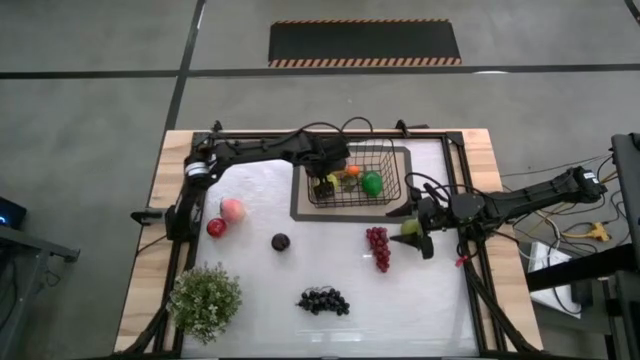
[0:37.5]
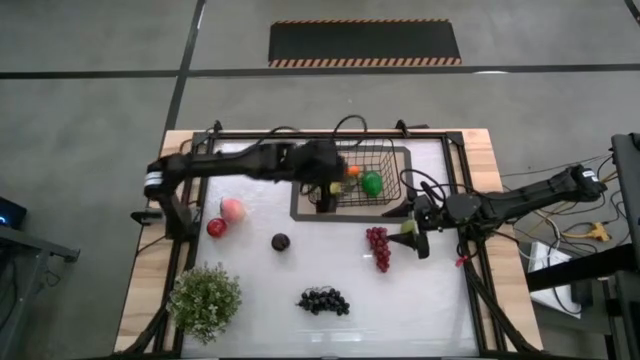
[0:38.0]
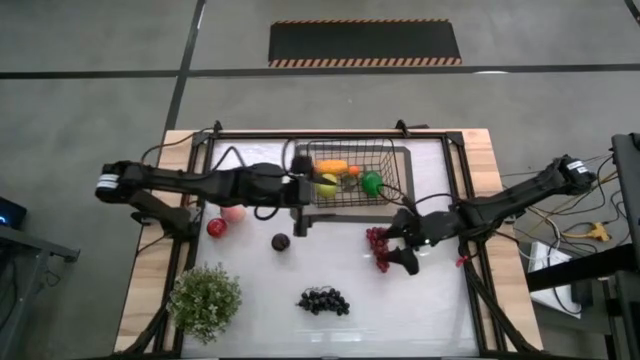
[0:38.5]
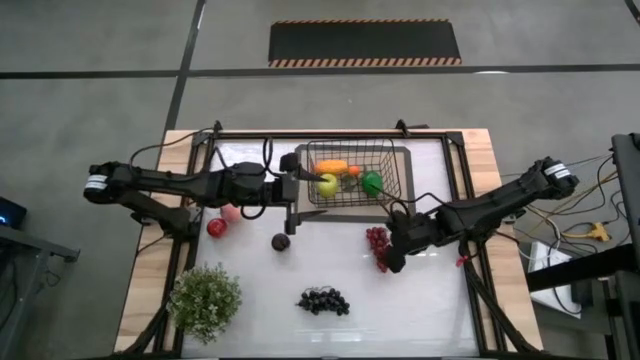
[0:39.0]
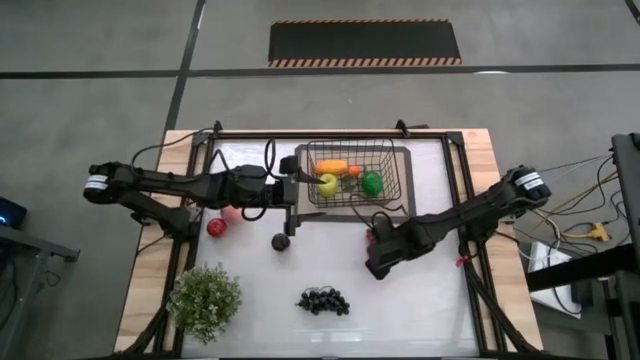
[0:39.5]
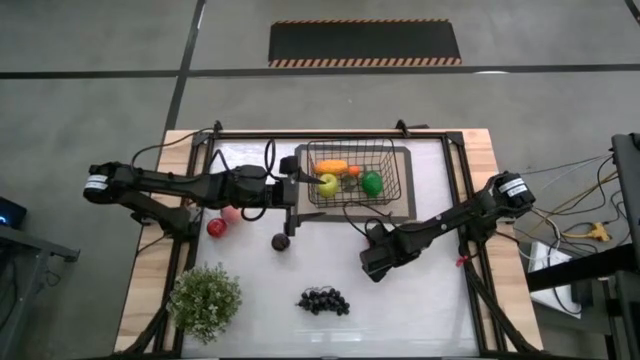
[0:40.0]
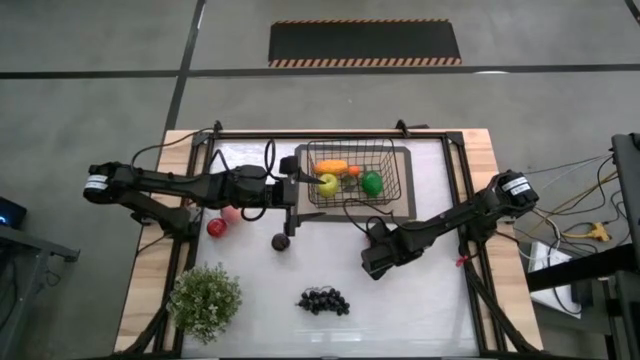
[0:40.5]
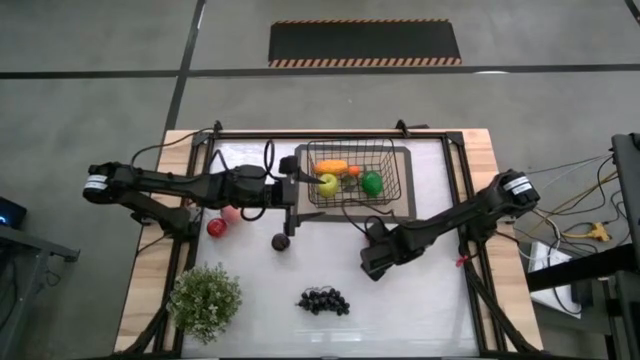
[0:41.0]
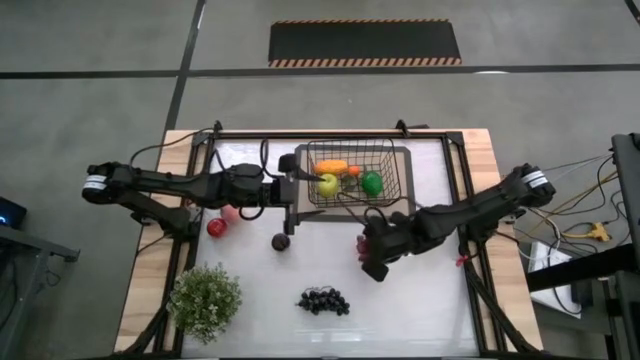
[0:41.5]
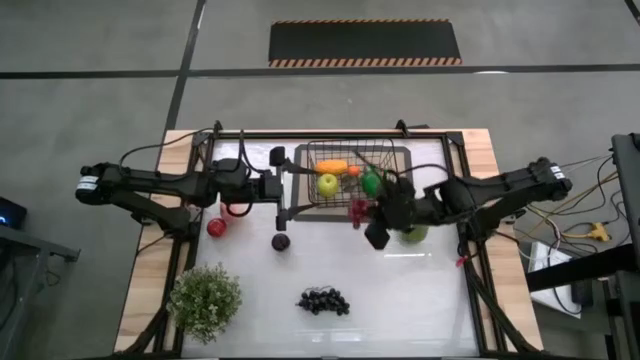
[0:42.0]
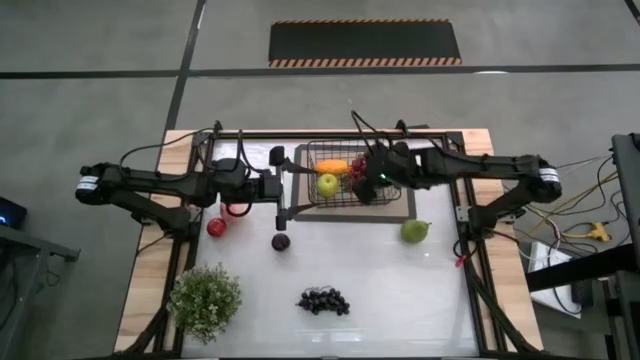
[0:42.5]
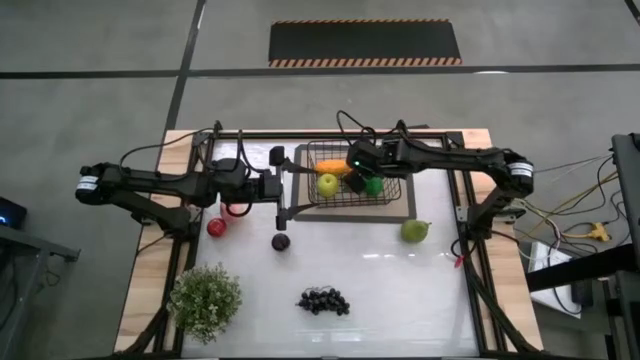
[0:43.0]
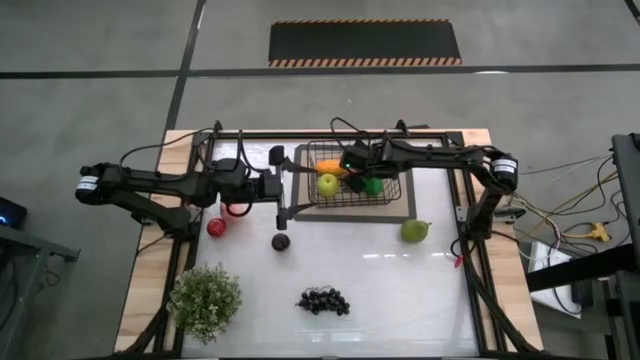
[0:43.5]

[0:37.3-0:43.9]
Task: Build produce basket
Put the red grapes into the black wire basket

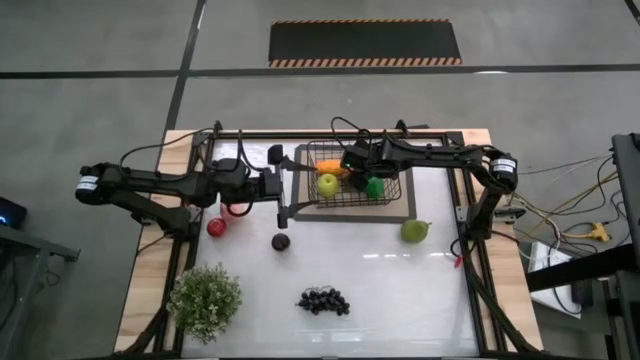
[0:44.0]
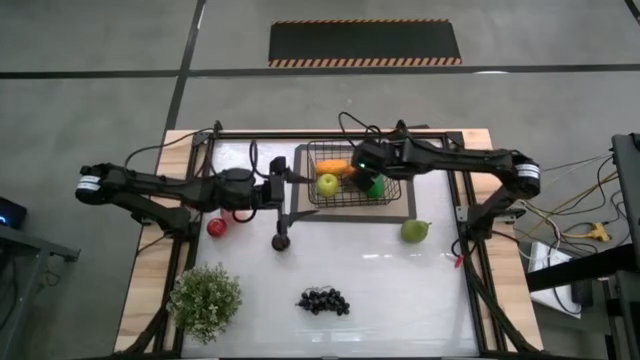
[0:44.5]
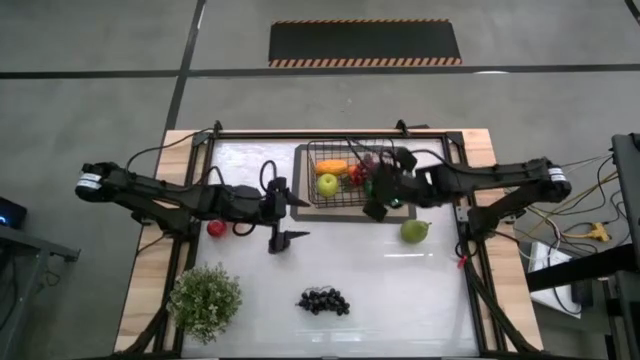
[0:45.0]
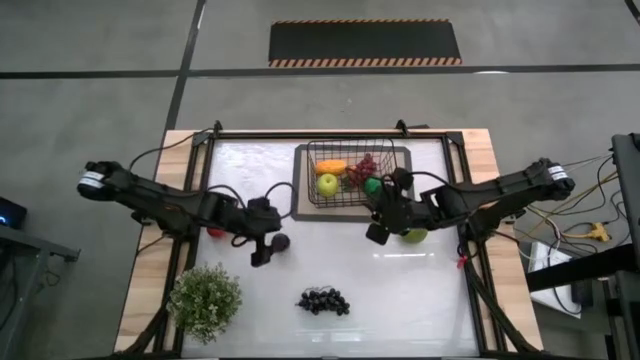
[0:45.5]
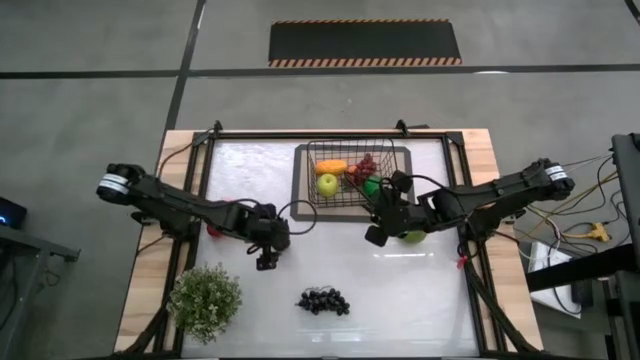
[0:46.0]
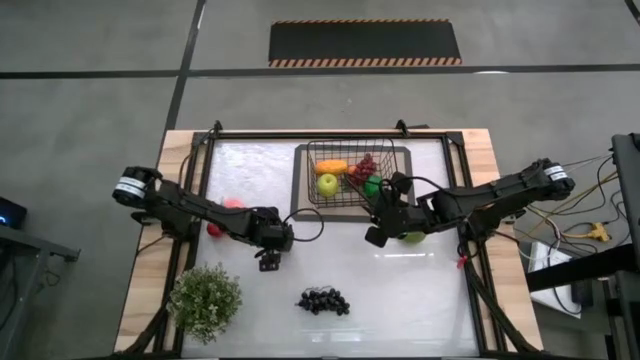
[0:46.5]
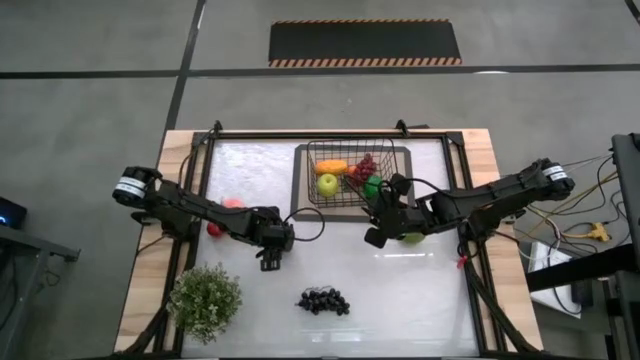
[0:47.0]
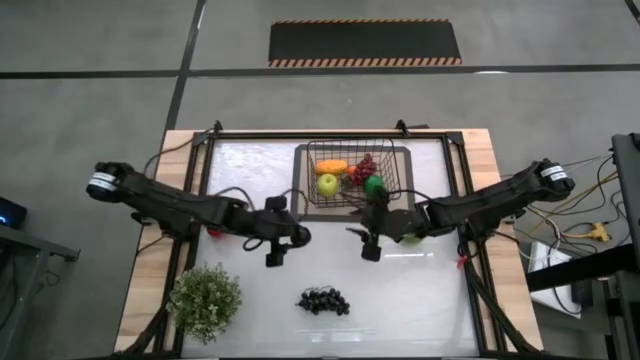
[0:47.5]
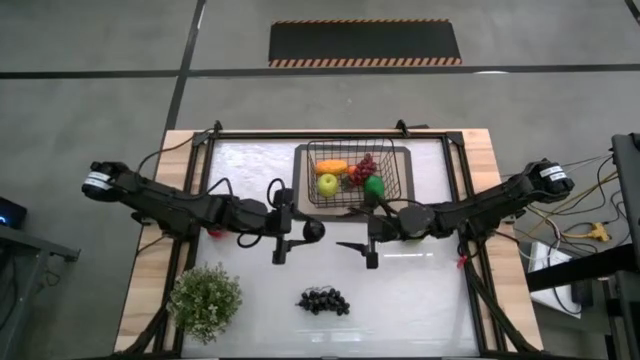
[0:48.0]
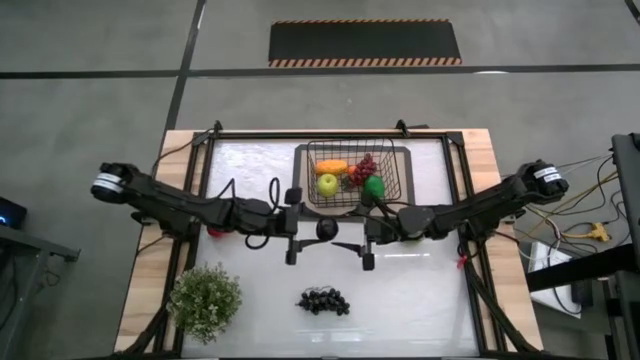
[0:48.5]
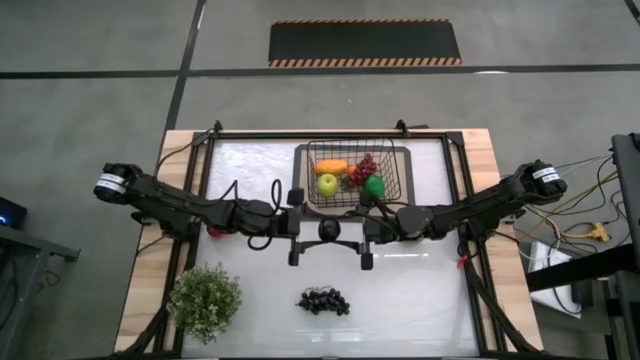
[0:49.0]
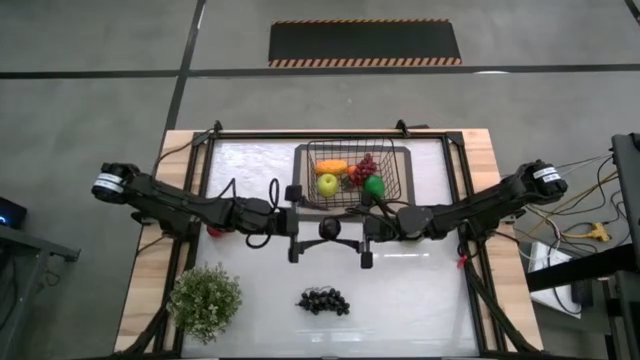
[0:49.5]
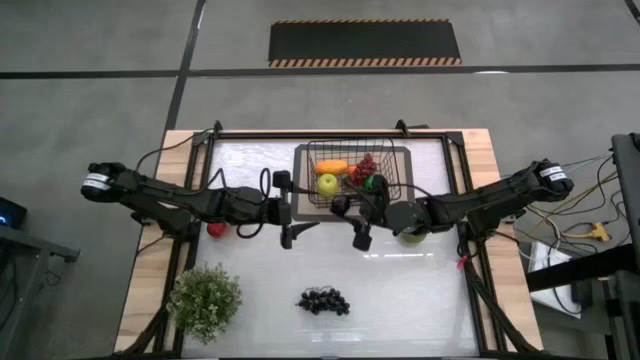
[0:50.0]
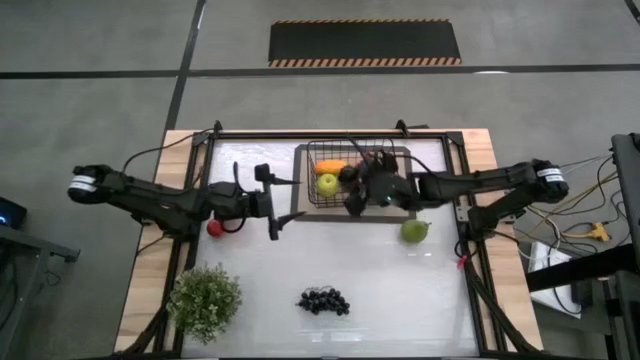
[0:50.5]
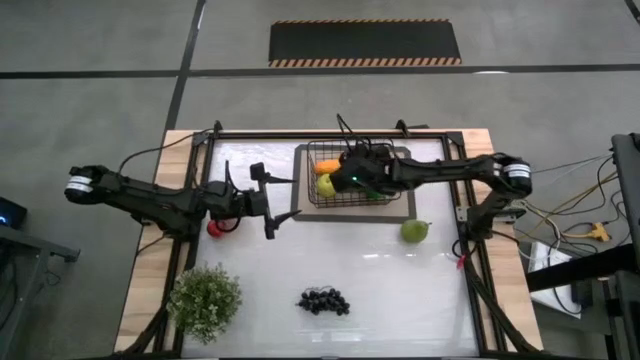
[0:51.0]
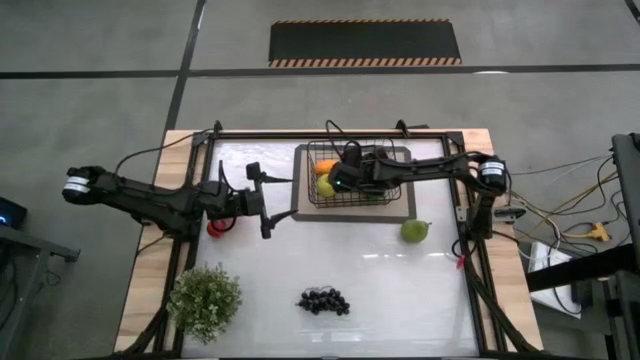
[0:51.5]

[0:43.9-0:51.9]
Put the black plum into the black wire basket

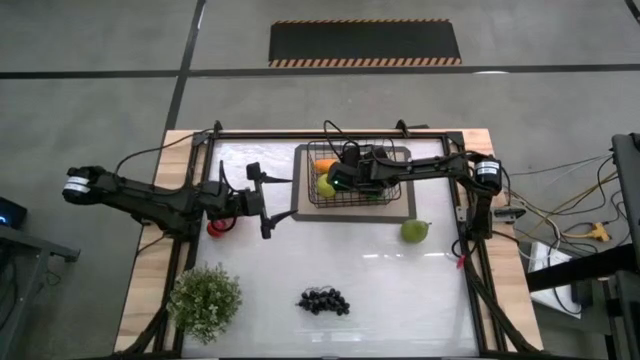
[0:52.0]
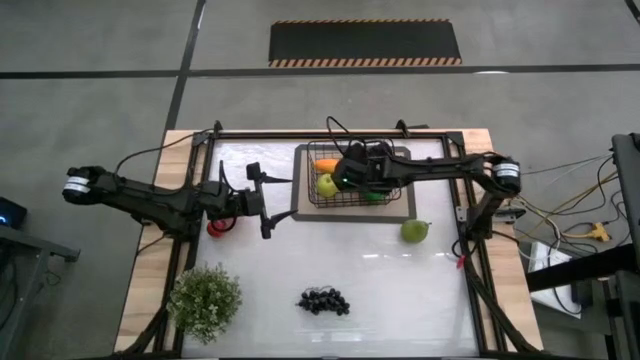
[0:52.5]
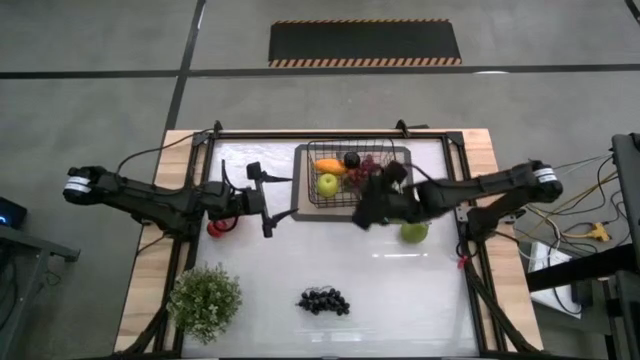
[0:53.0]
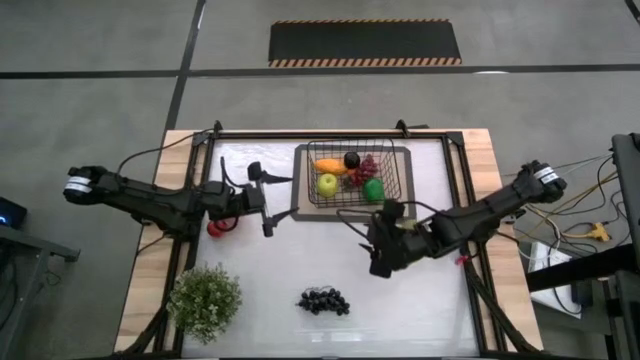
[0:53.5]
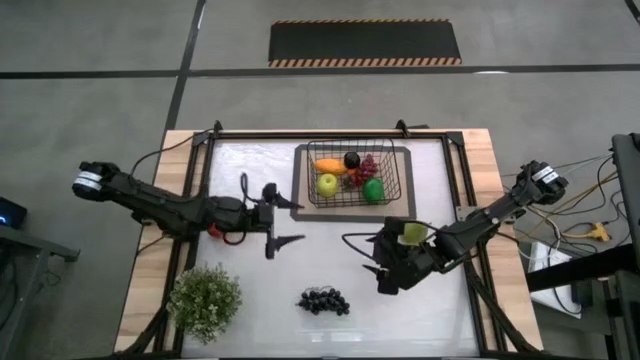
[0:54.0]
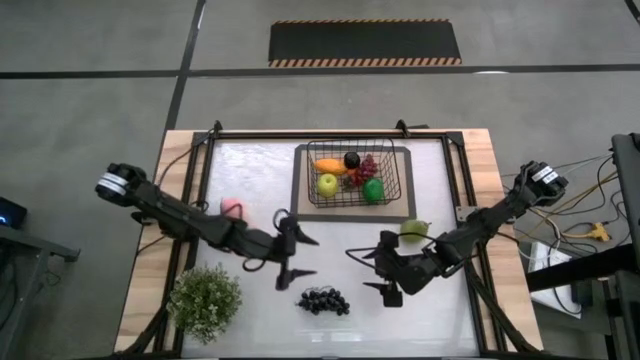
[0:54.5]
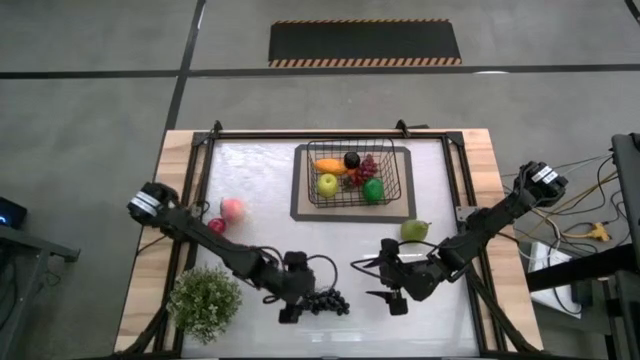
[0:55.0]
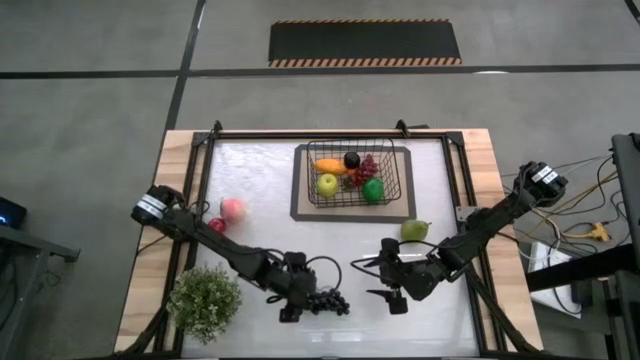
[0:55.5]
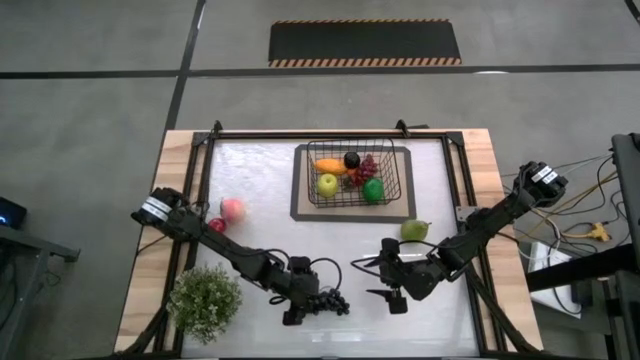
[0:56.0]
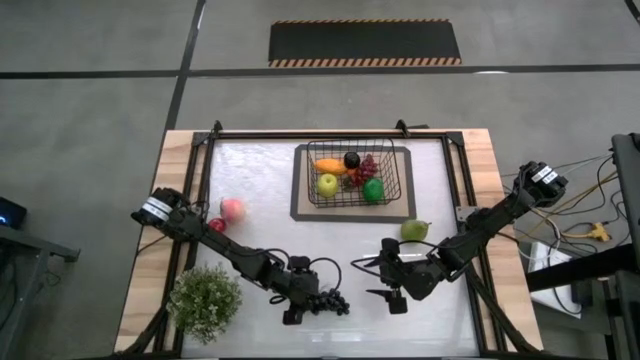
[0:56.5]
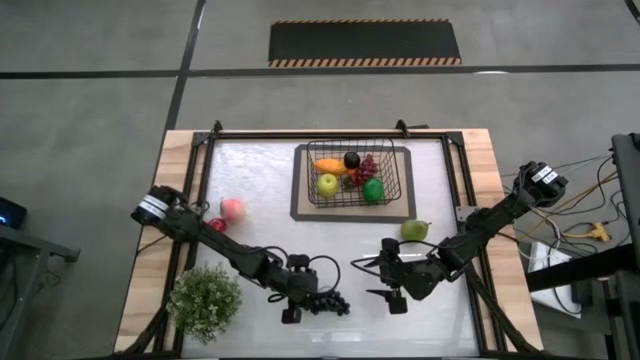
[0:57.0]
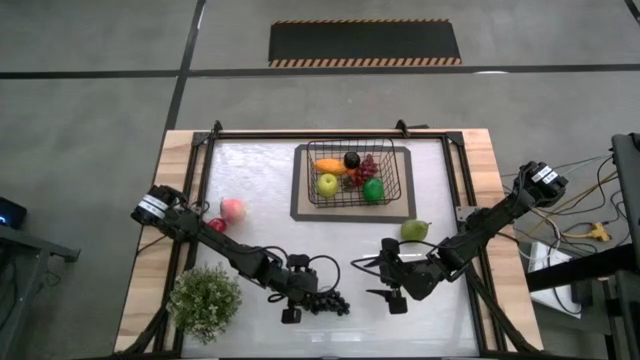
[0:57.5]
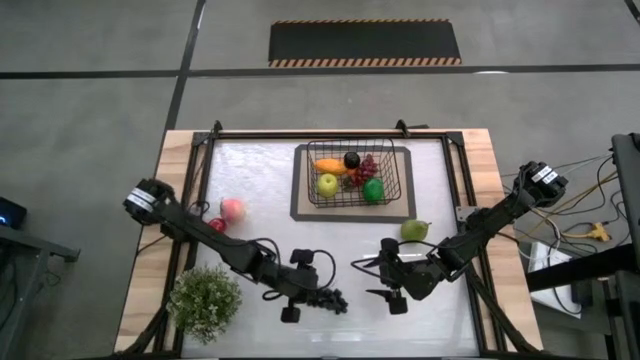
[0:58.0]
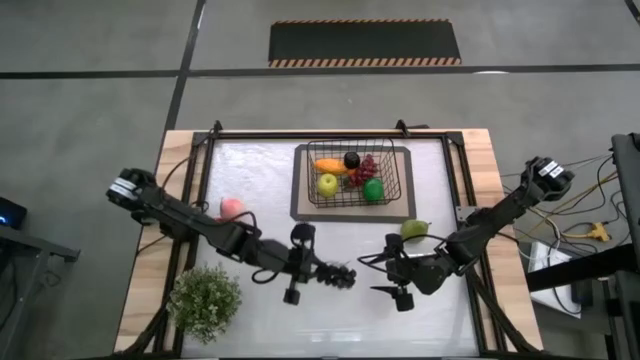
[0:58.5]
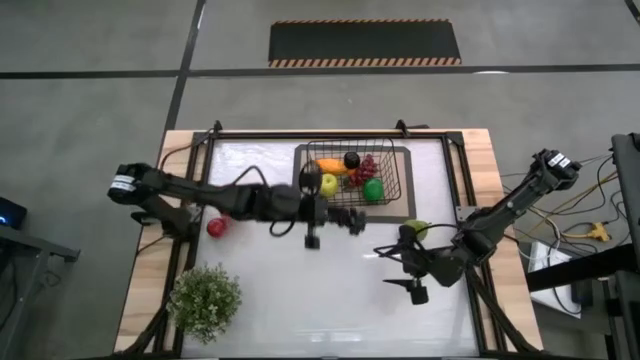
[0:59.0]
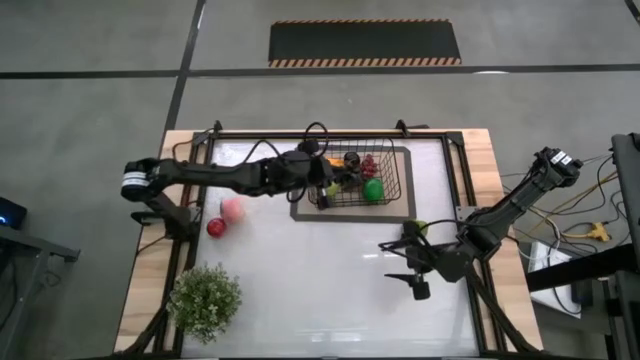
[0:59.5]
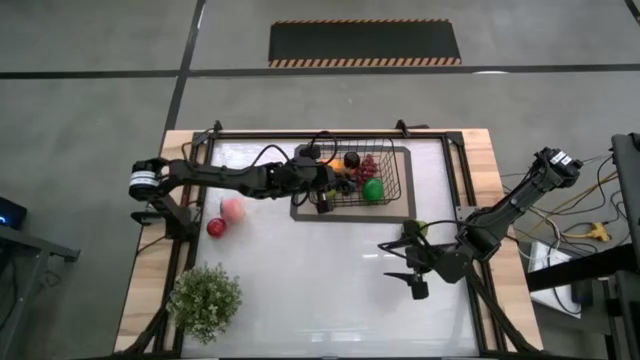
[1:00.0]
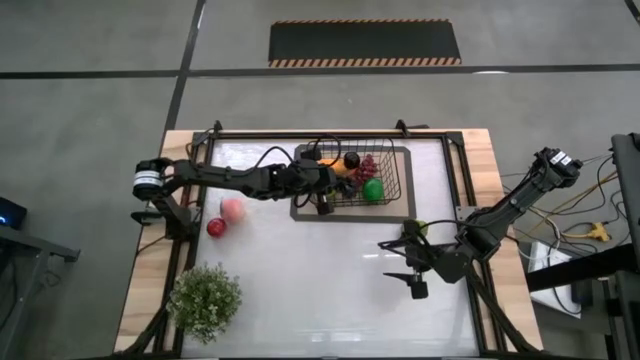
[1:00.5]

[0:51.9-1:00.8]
Put the black grapes into the black wire basket
